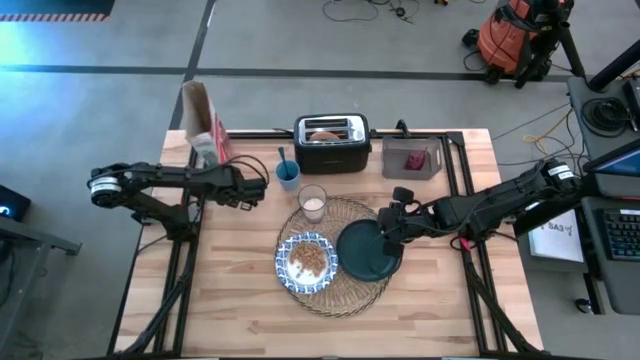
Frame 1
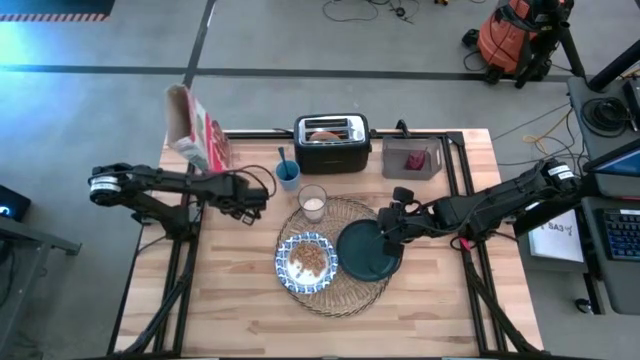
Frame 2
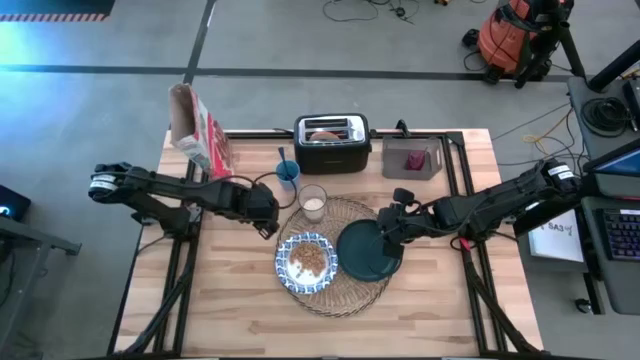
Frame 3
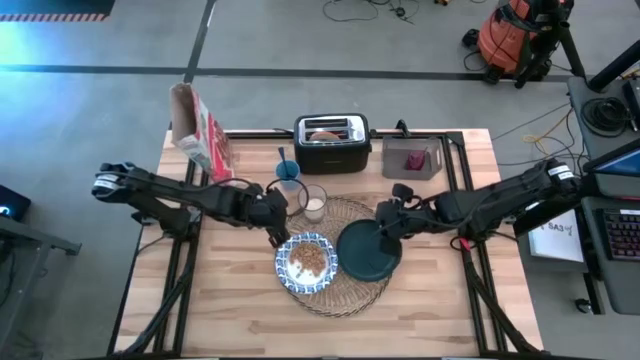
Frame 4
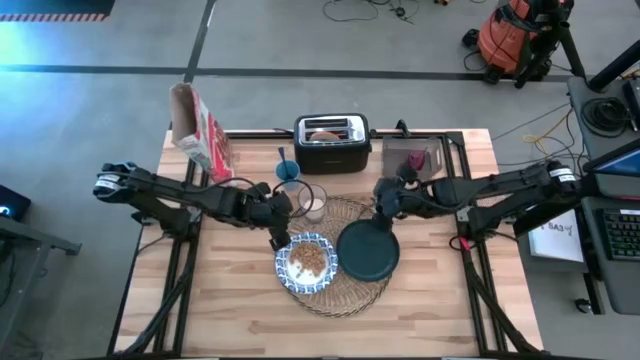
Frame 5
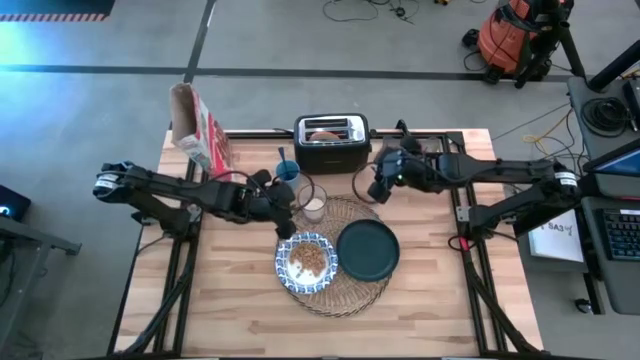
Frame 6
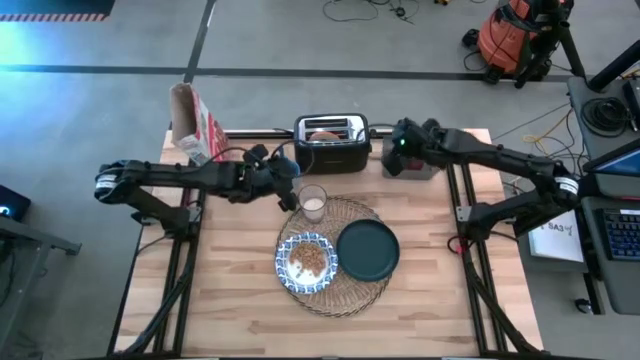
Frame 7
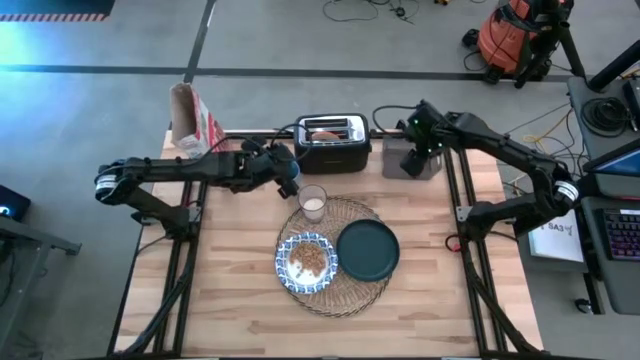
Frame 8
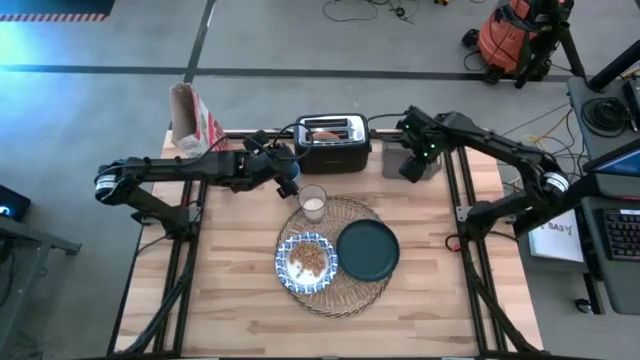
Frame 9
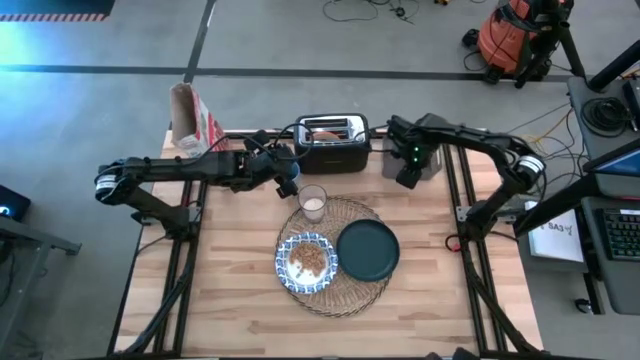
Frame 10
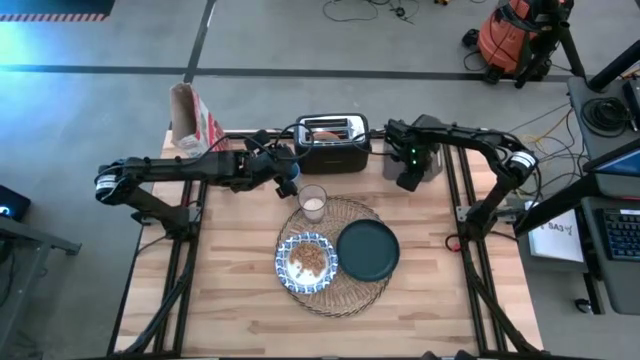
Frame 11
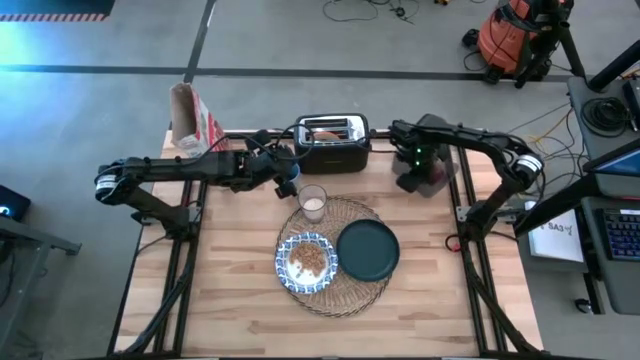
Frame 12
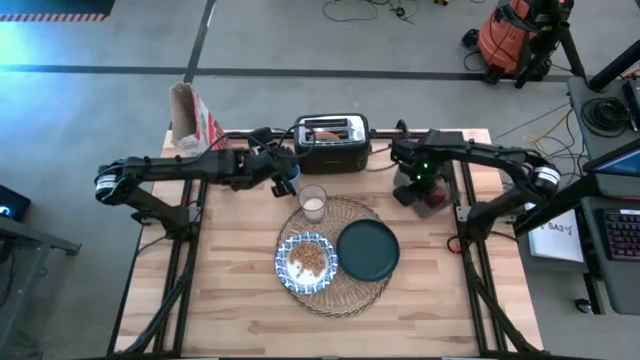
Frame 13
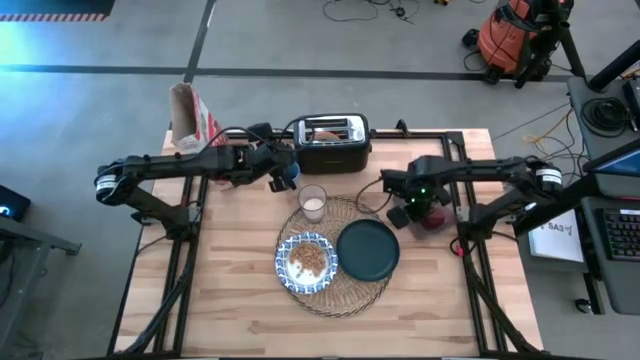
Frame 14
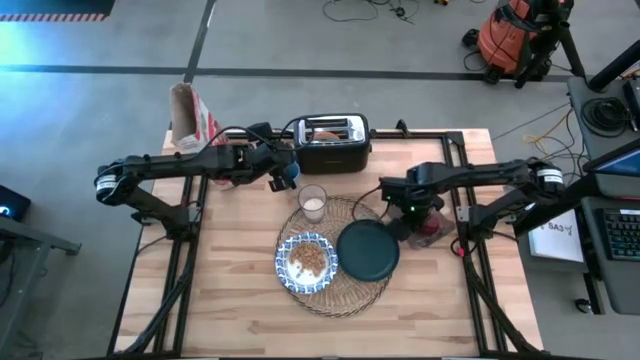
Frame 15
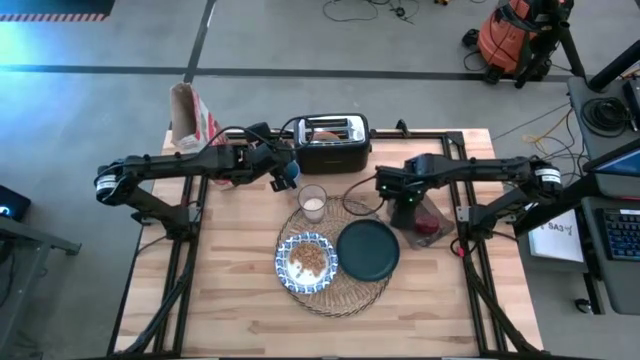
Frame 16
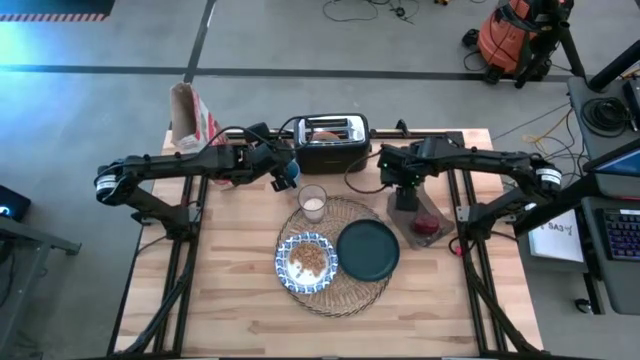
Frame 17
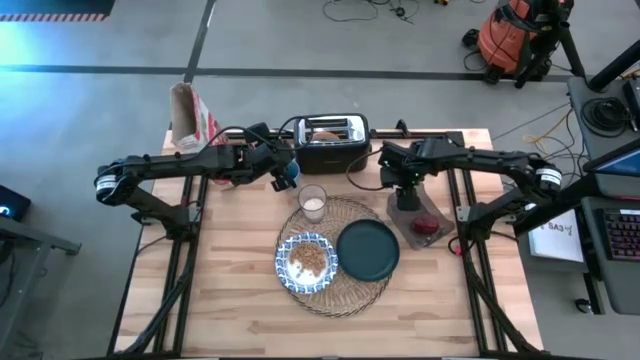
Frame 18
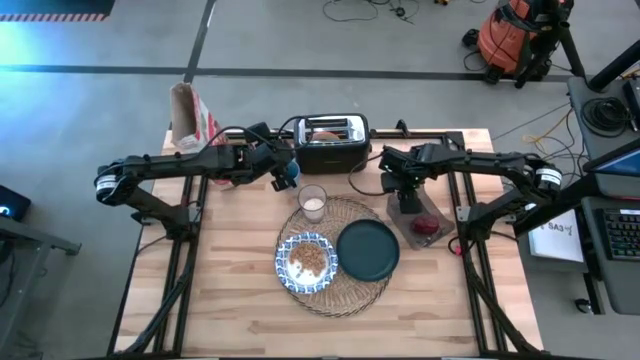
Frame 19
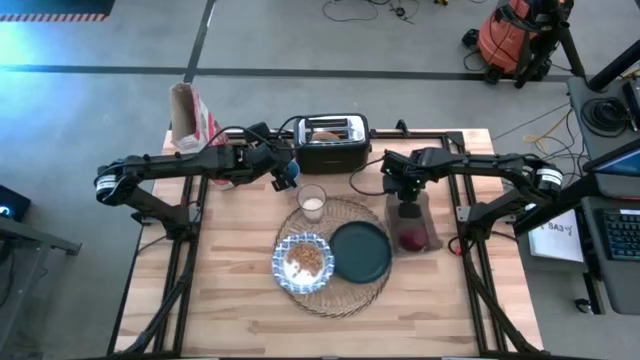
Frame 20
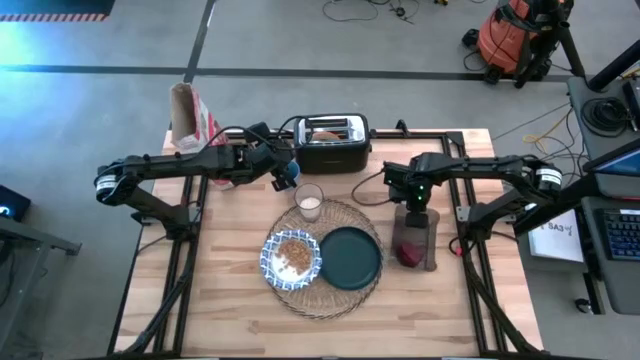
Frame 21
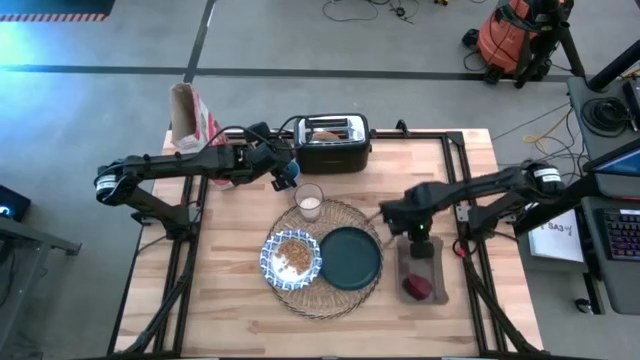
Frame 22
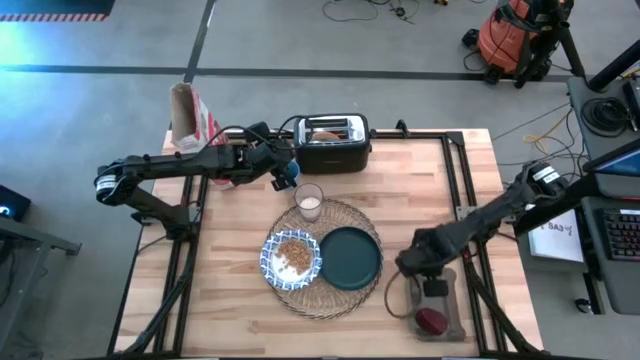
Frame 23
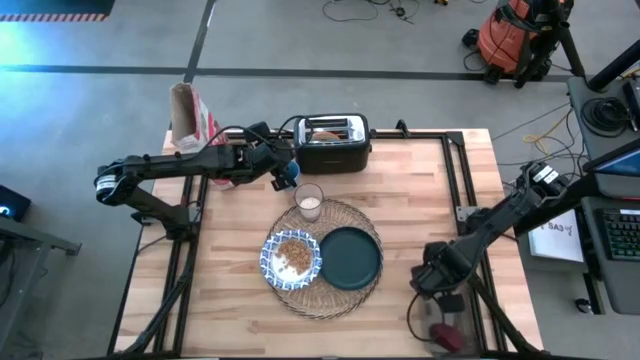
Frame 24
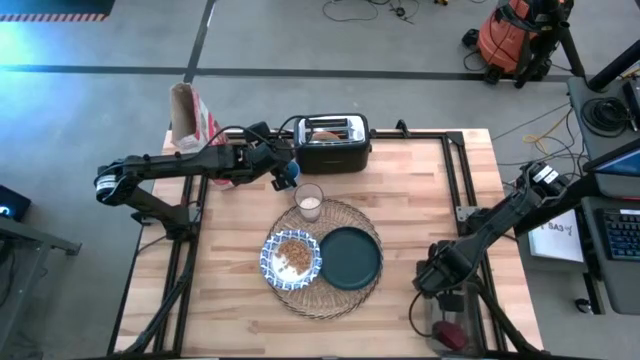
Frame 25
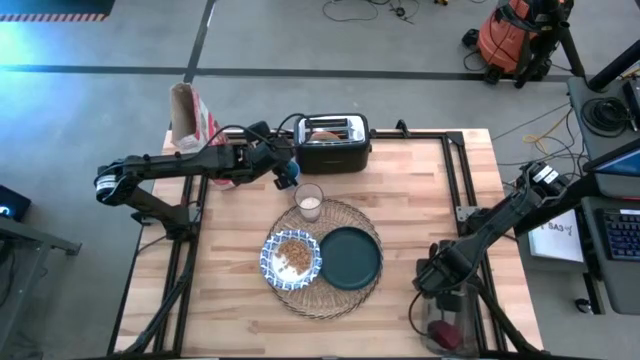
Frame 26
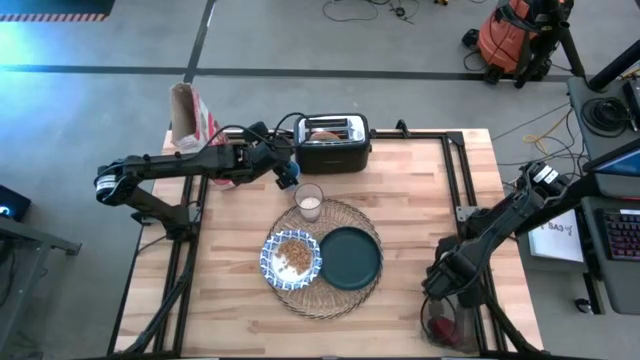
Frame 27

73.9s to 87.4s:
Task: Arrange a breakfast setting
Move the black bin to the bottom right of the table

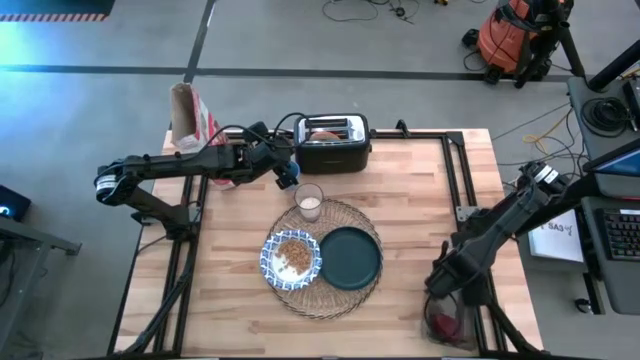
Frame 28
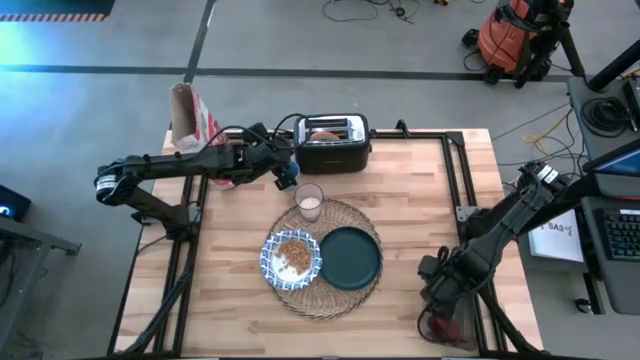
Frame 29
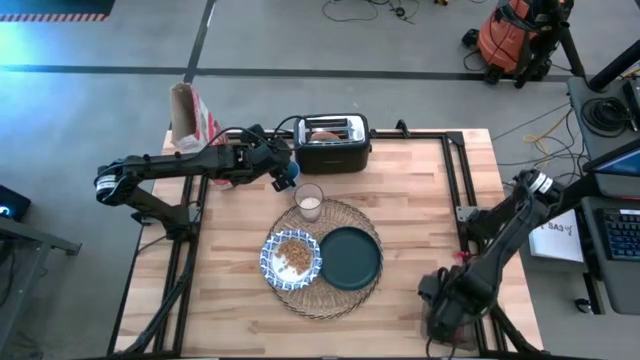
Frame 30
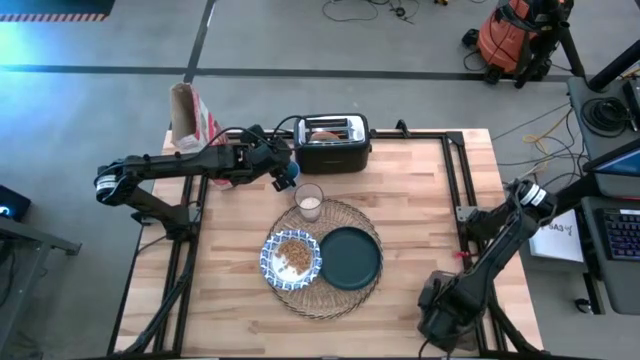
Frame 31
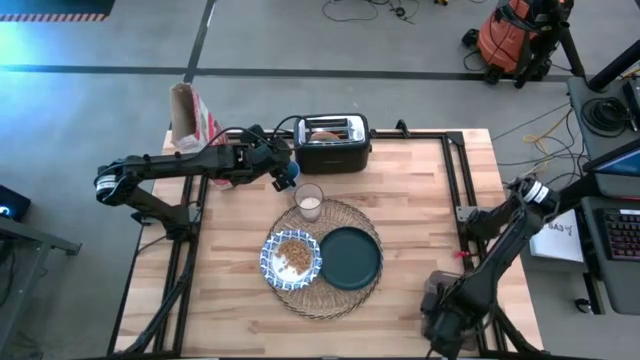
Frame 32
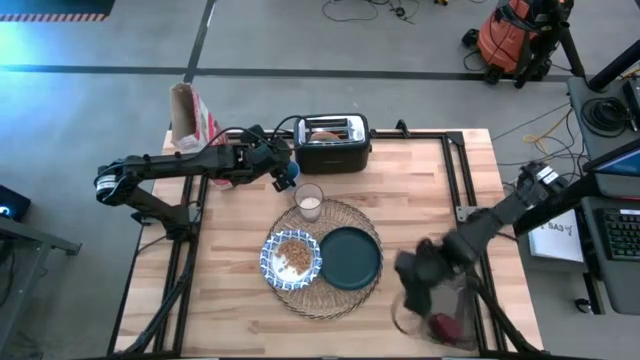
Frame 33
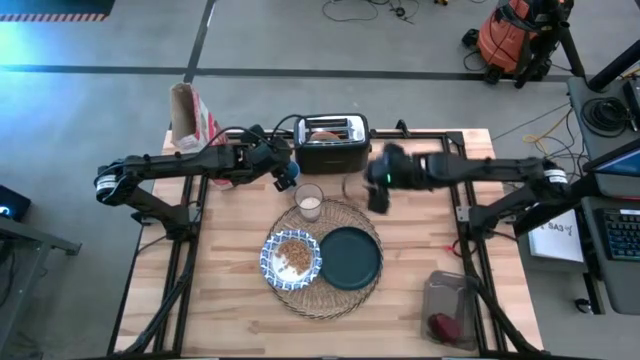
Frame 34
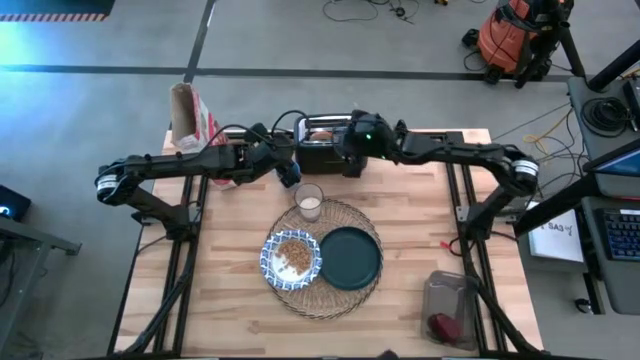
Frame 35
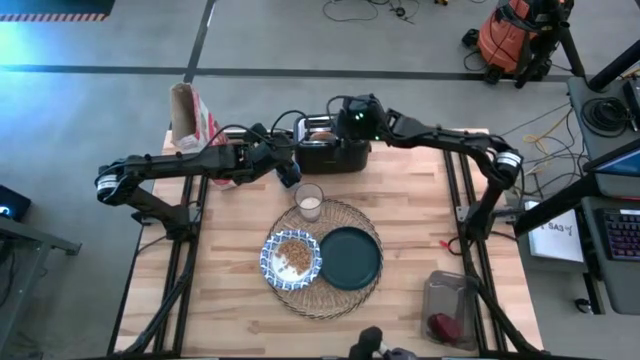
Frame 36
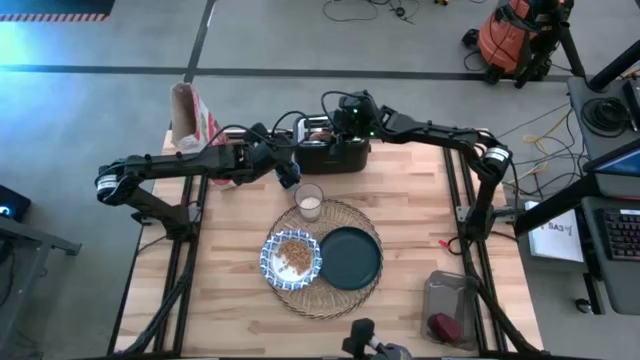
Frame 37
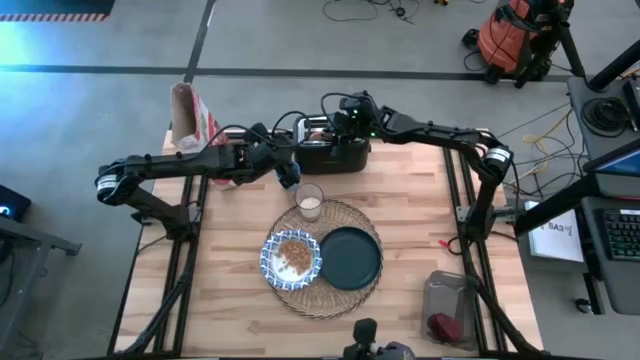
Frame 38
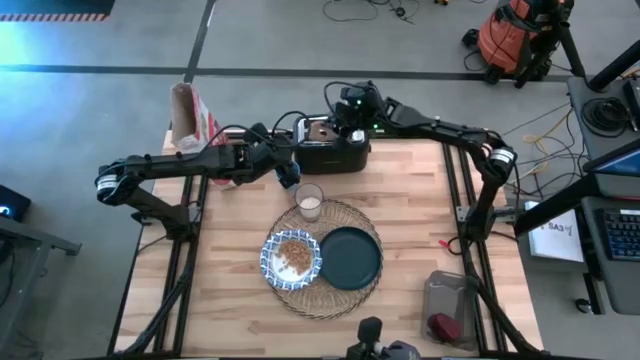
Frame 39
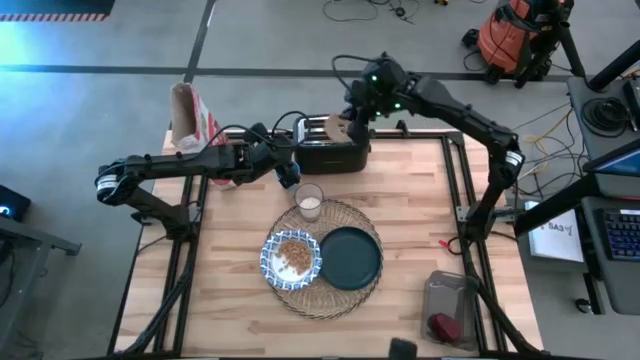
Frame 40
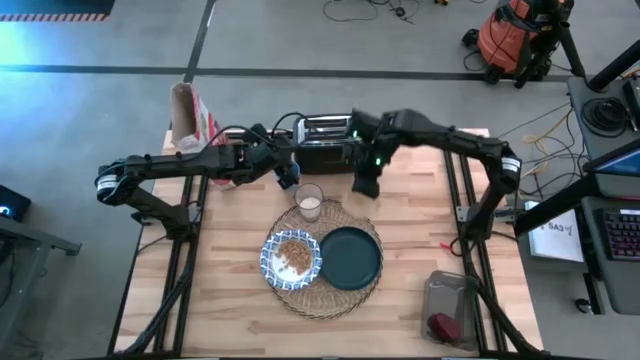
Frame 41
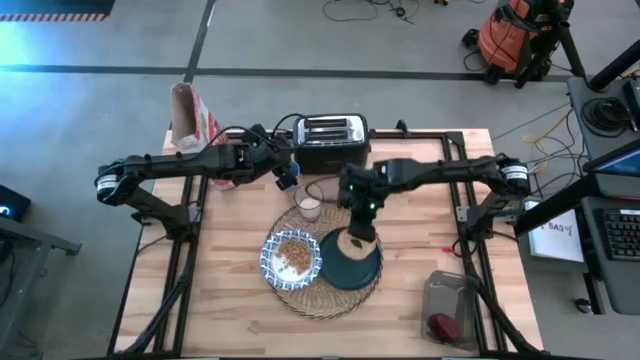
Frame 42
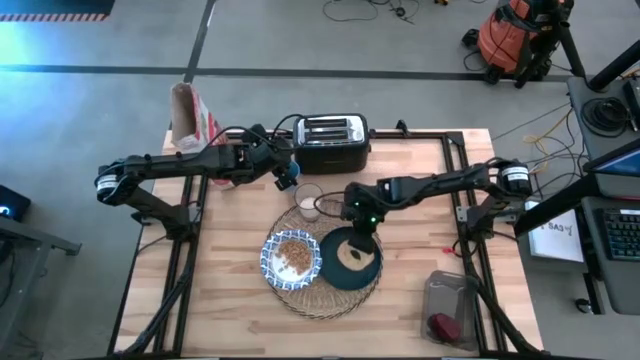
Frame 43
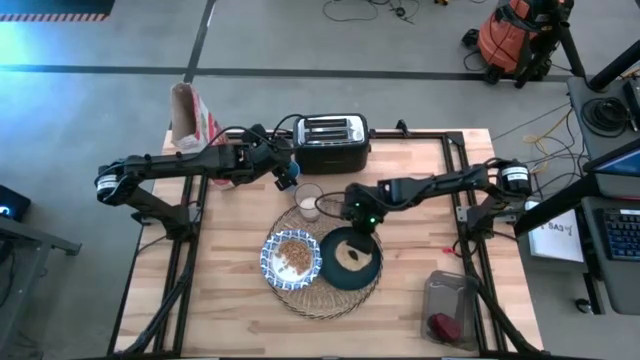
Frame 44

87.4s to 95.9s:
Put the brown toasted bread on the black plate
